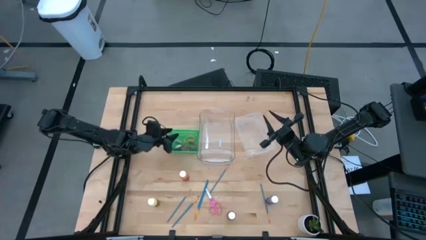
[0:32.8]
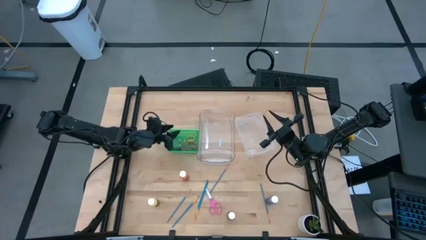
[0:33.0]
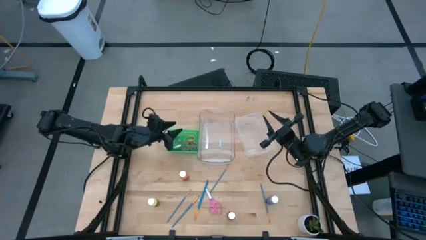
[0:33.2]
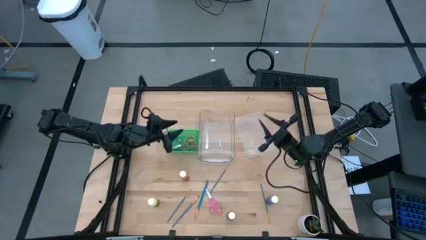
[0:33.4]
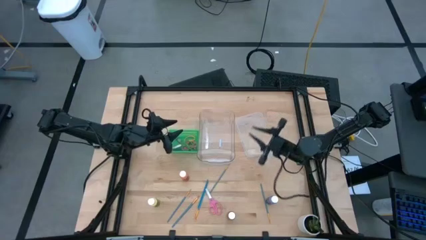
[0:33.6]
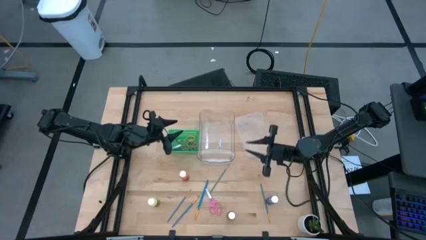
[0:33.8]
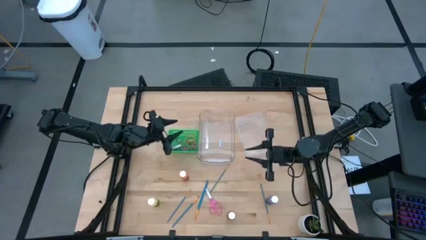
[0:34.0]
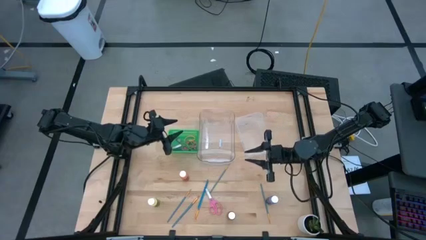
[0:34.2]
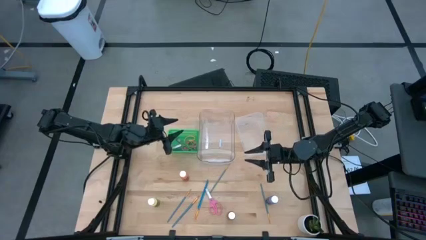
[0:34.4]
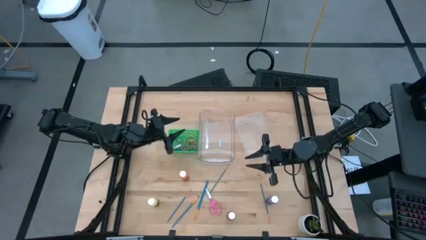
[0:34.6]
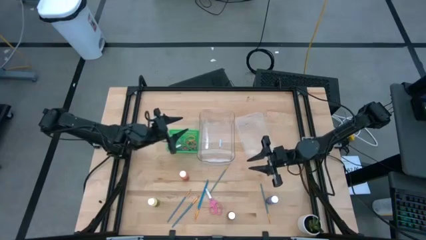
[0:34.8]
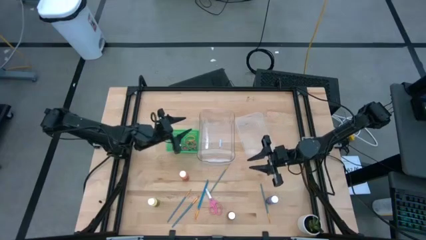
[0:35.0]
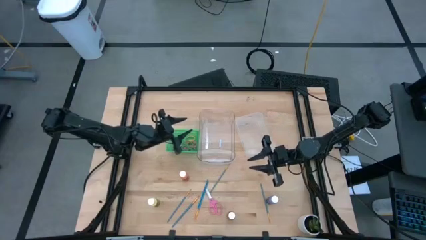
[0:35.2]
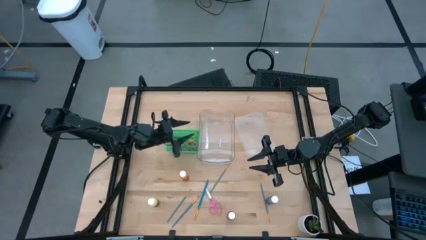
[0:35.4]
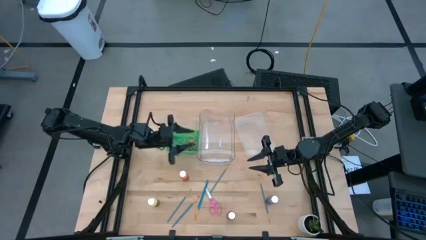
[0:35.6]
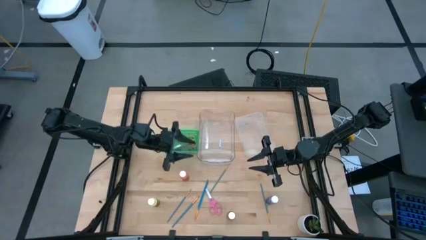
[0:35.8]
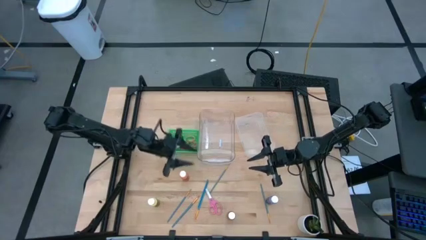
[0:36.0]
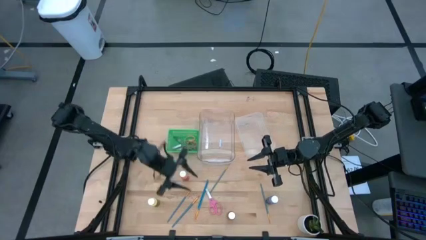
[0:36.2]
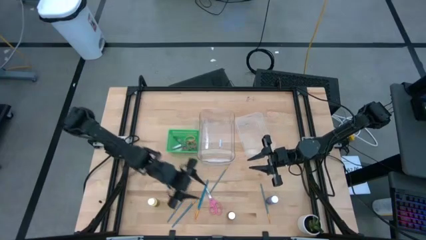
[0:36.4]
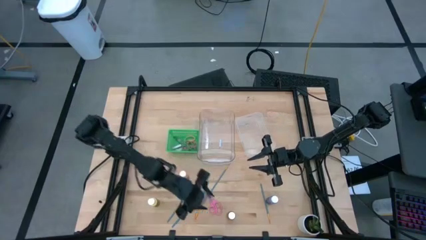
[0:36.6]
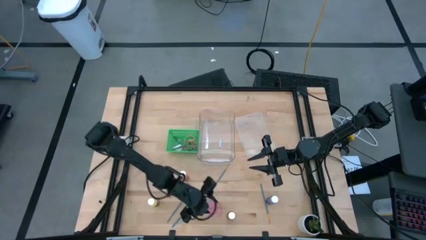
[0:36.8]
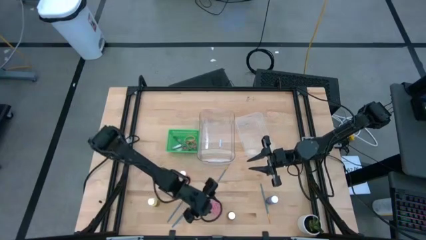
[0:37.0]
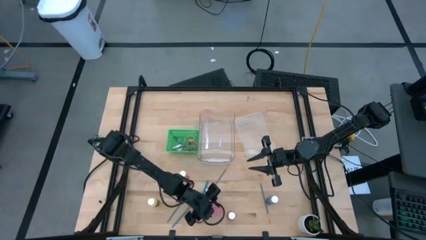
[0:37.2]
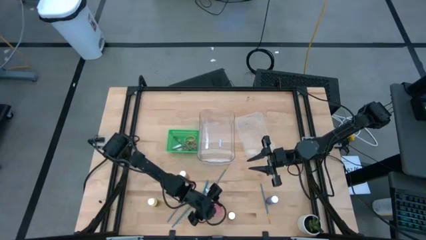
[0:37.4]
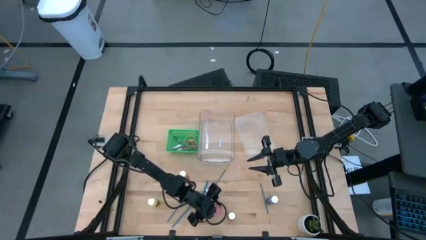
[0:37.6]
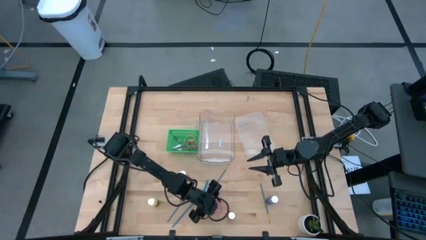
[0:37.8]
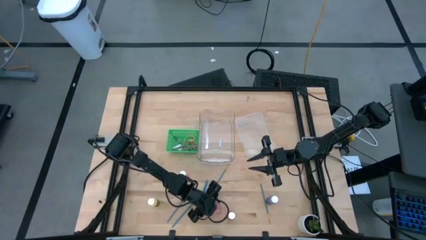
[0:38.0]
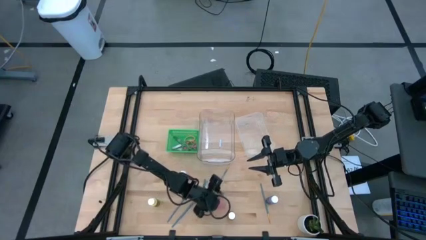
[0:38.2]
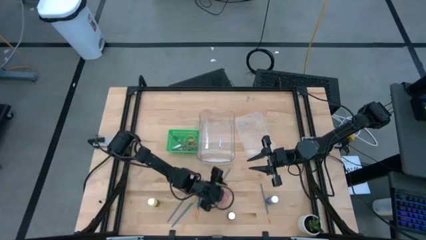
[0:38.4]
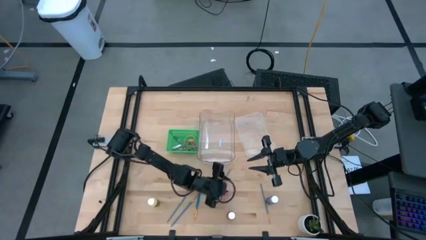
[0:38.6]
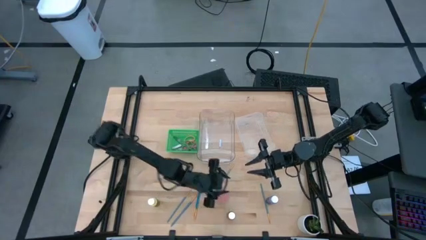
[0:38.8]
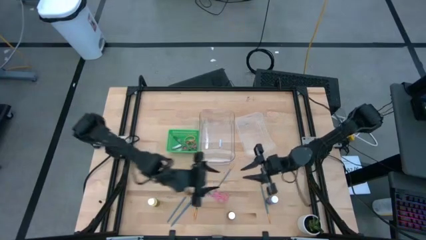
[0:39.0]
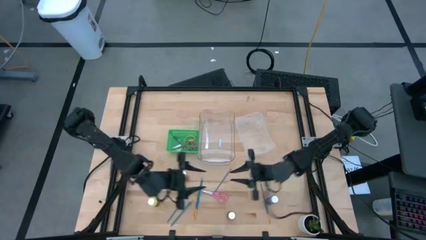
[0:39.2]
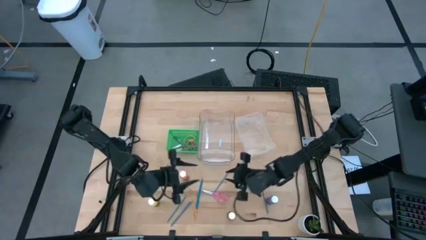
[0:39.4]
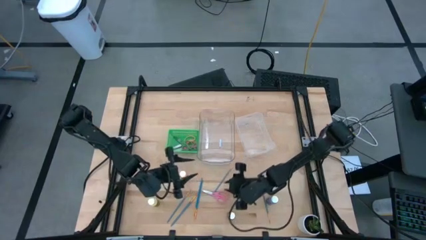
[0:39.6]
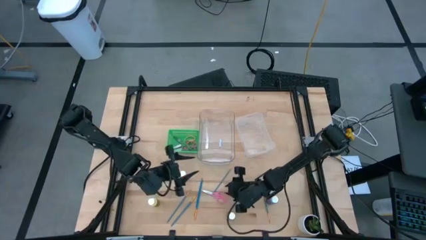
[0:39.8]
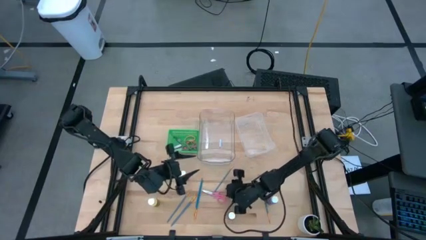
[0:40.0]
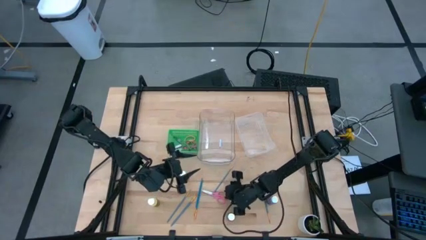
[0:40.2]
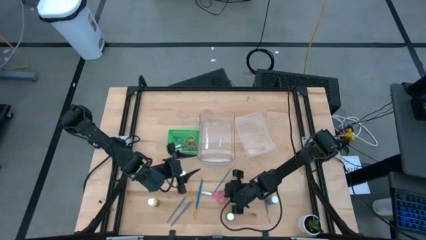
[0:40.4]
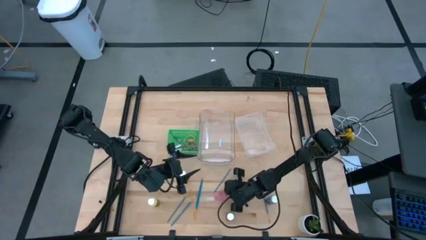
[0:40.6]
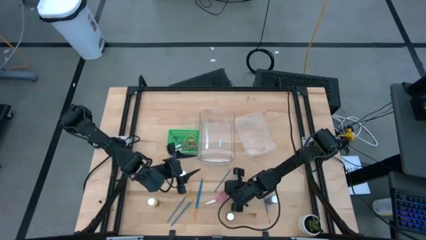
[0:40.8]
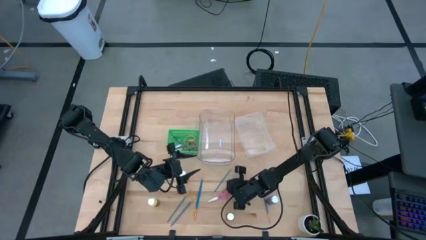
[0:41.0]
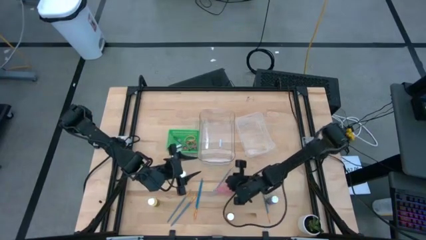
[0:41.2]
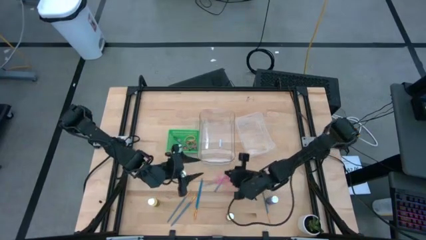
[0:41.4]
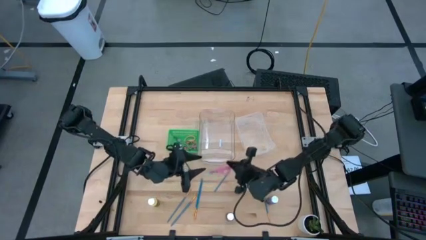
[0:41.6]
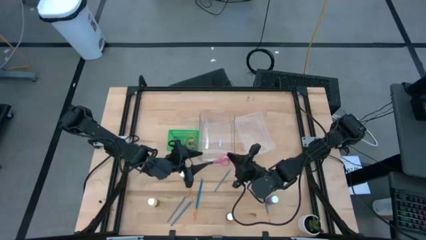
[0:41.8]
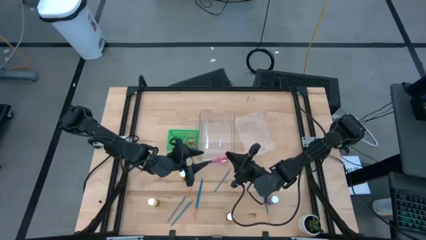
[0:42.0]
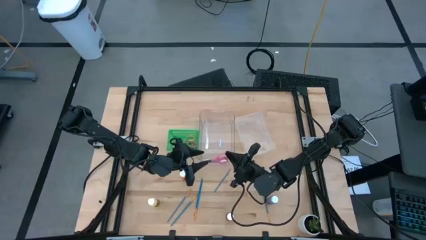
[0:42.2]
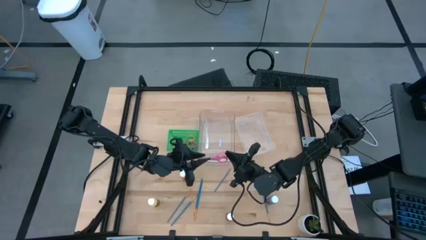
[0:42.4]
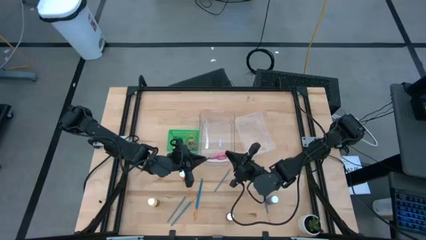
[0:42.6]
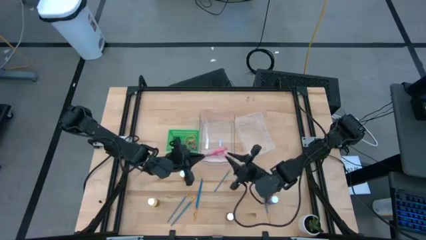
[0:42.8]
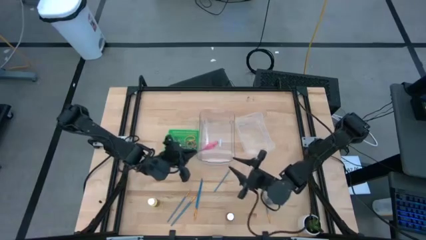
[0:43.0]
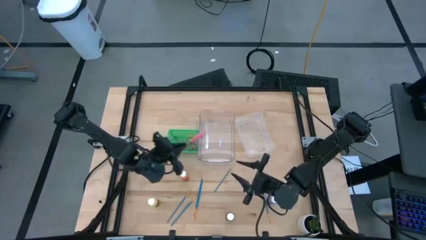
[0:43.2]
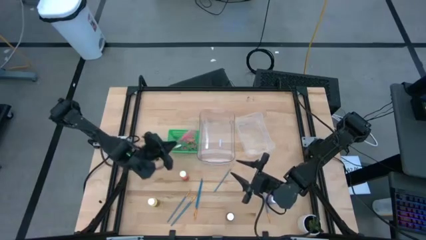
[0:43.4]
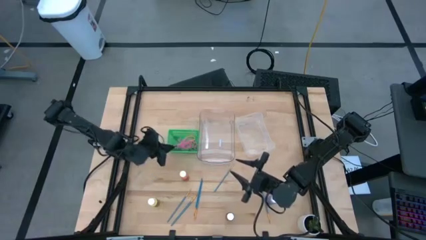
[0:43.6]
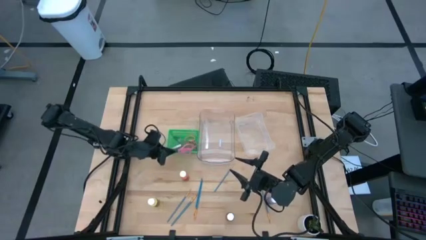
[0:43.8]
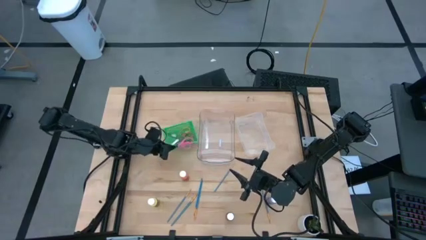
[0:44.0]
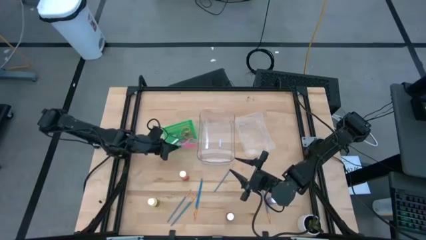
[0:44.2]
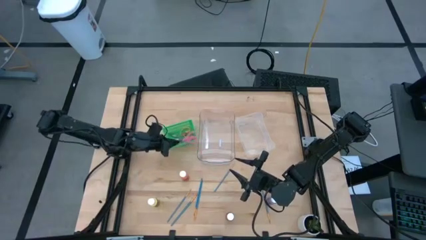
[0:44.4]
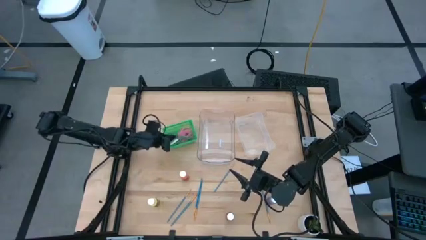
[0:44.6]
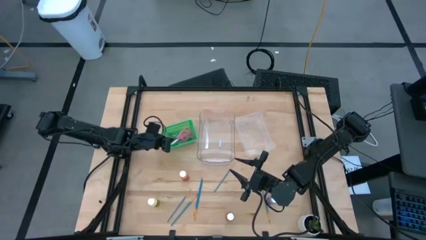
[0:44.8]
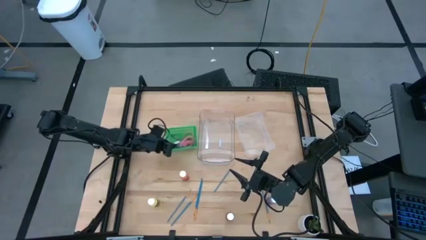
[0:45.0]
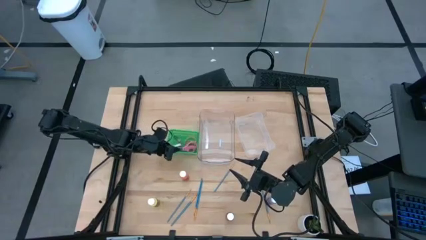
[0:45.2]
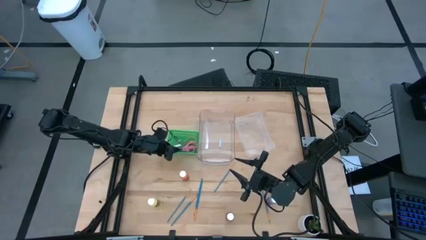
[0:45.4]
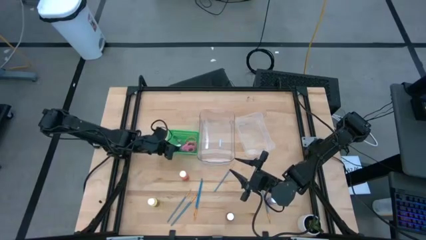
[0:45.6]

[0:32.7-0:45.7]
Task: Pick & Place Paint Supplies
Put the pink scissors into the green bin

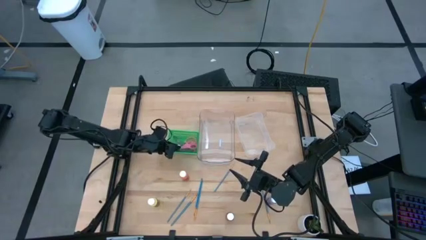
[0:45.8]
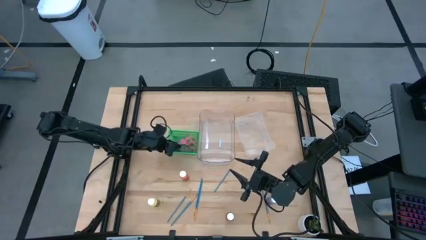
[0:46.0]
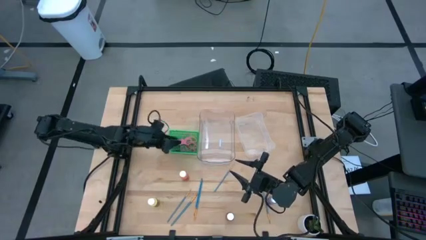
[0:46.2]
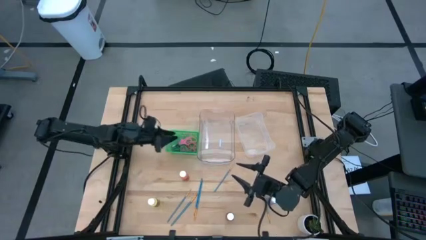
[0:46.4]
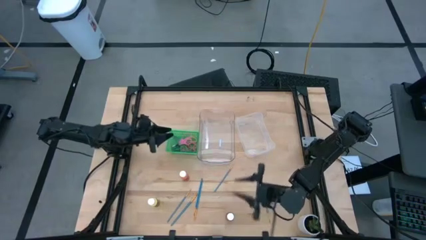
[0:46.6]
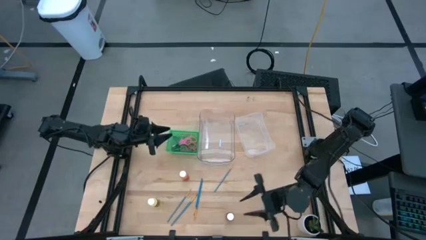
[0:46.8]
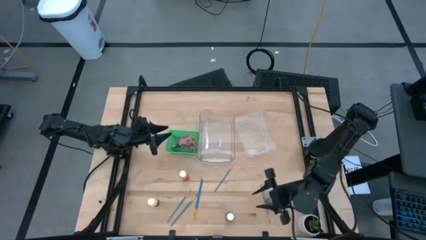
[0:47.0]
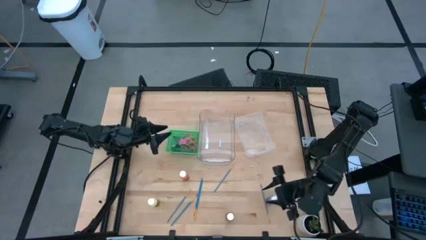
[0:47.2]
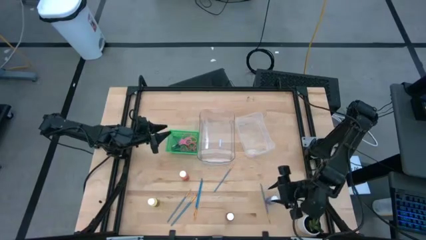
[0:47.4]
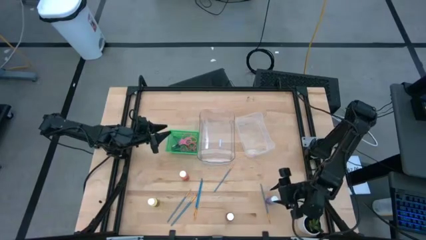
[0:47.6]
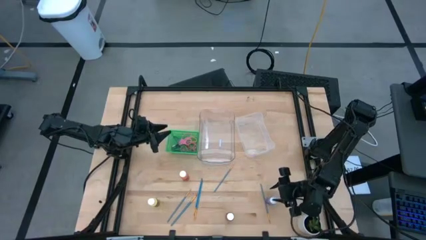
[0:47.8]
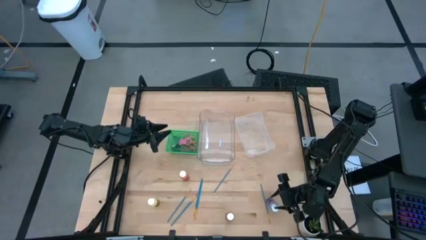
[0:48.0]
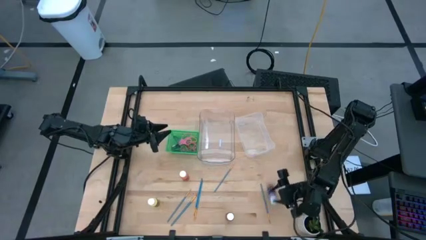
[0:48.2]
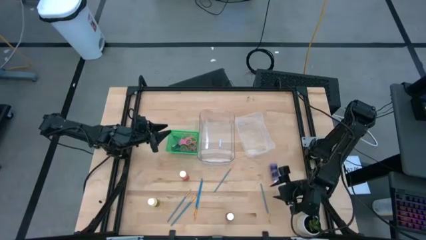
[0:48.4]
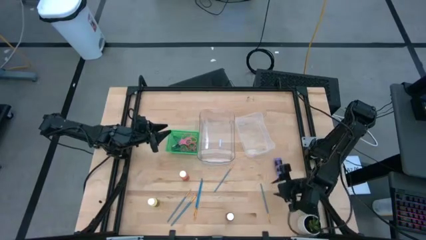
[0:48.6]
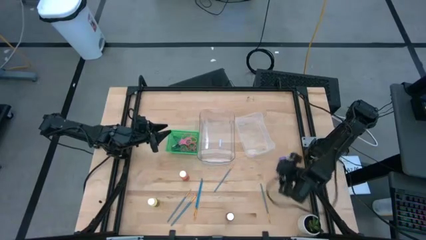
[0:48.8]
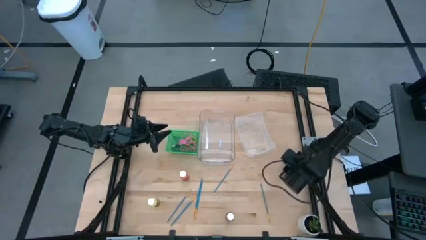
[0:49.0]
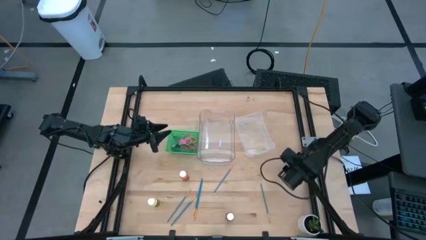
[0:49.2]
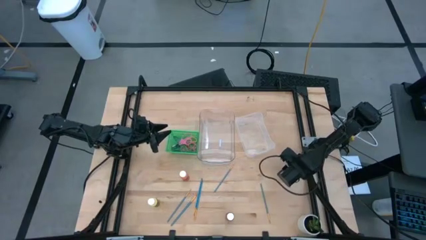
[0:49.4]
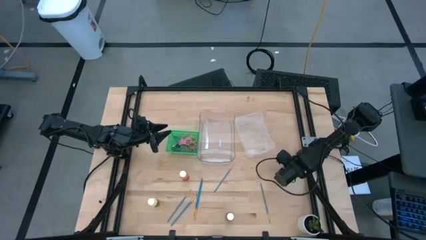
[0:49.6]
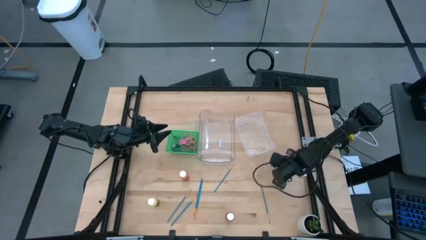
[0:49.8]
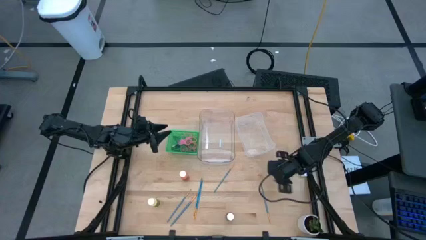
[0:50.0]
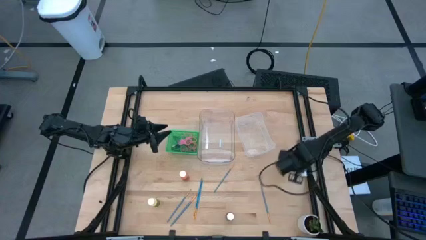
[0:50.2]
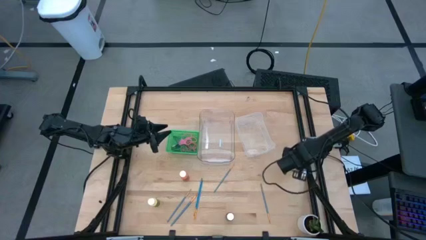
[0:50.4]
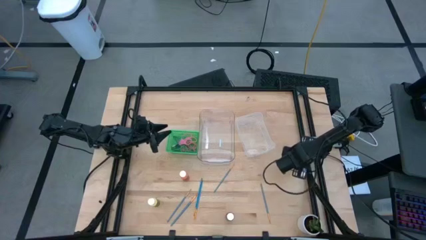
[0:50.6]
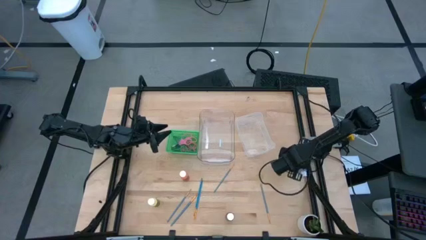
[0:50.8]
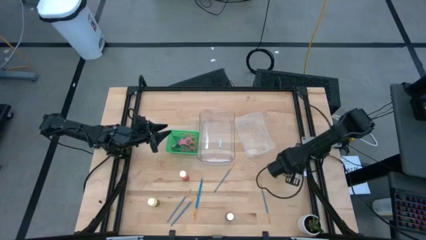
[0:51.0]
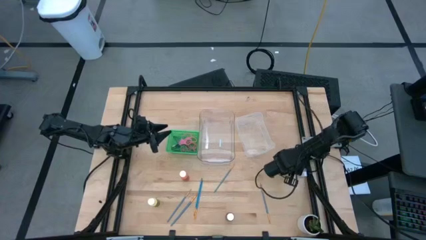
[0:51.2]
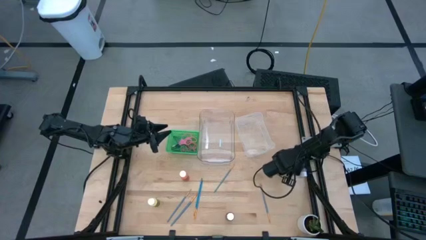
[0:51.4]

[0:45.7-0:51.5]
Put the violet paint bottle into the transparent bin
